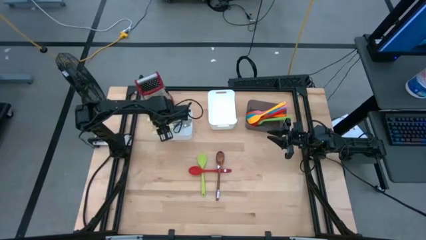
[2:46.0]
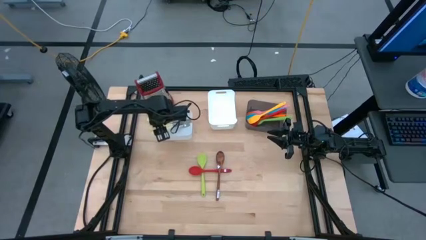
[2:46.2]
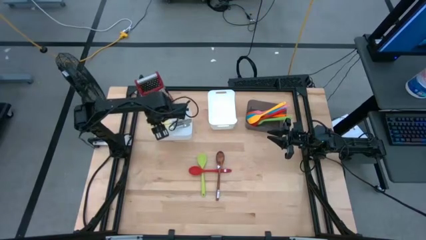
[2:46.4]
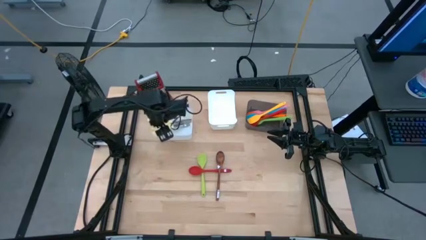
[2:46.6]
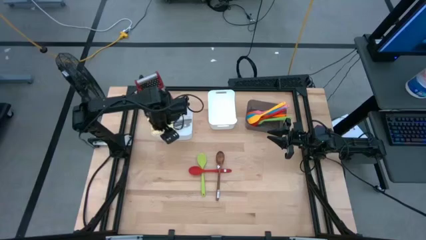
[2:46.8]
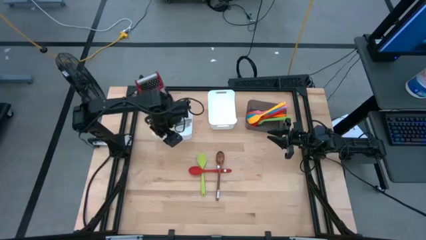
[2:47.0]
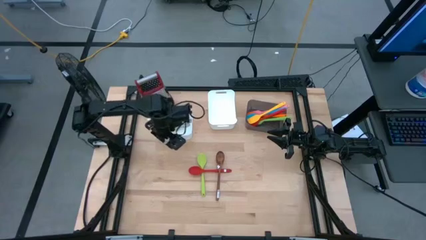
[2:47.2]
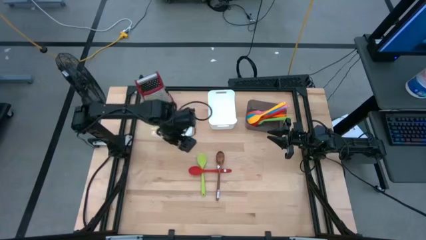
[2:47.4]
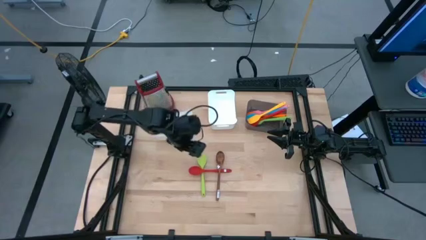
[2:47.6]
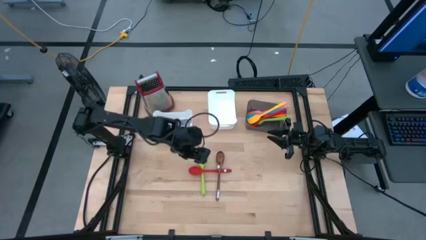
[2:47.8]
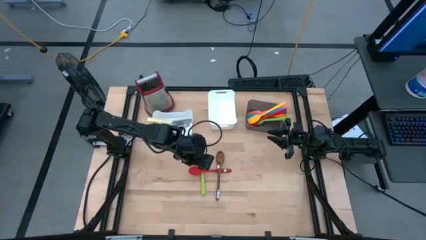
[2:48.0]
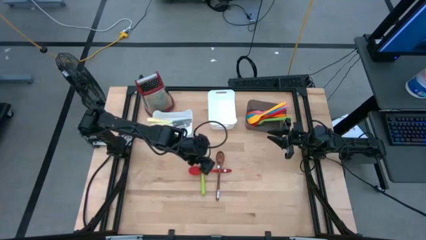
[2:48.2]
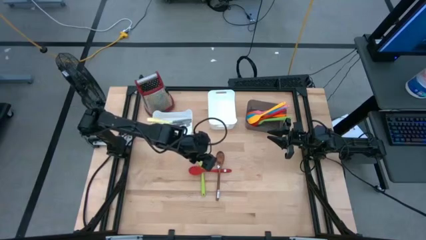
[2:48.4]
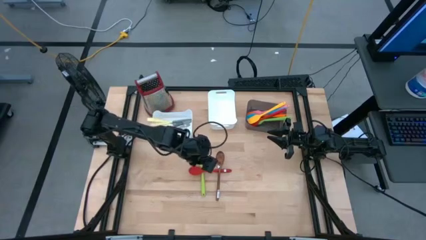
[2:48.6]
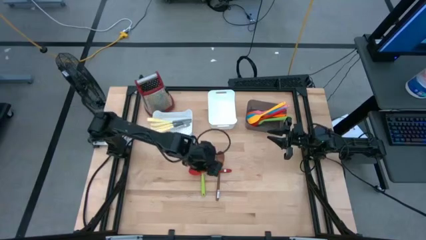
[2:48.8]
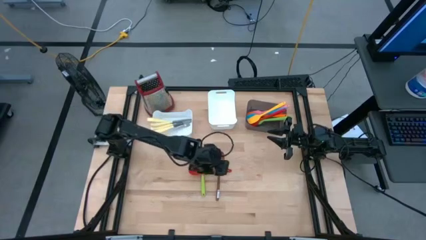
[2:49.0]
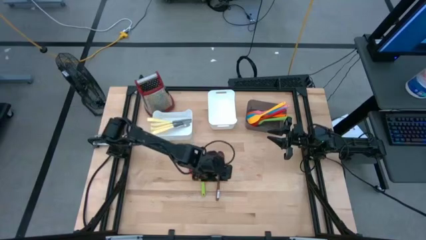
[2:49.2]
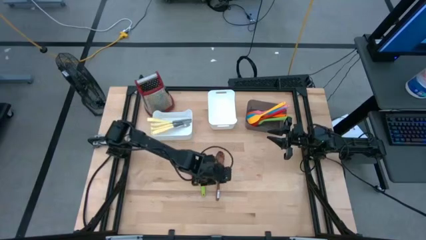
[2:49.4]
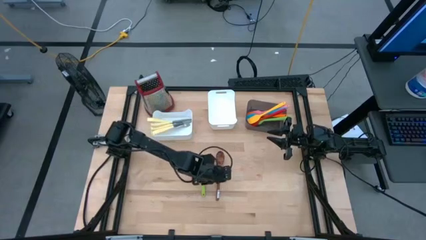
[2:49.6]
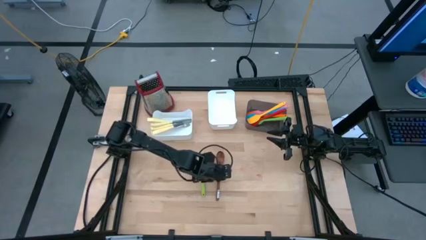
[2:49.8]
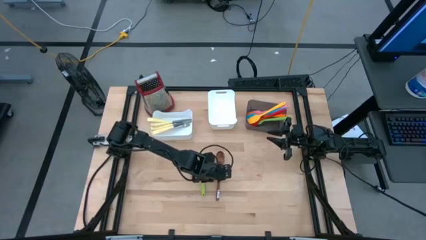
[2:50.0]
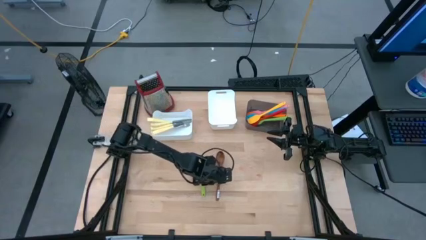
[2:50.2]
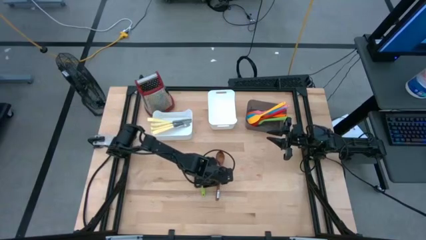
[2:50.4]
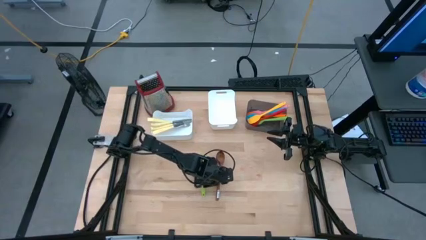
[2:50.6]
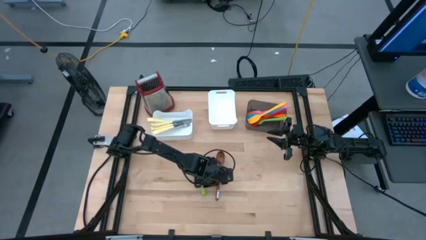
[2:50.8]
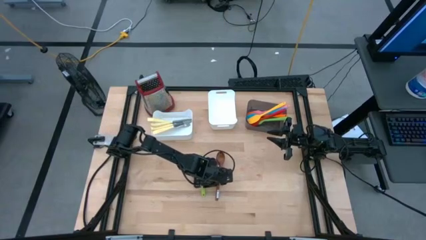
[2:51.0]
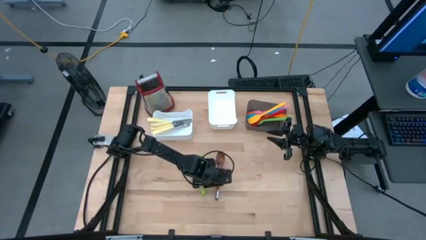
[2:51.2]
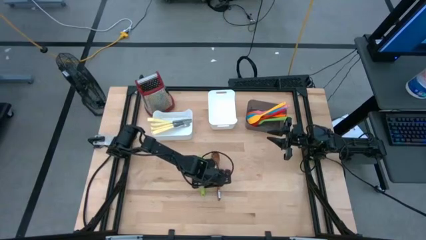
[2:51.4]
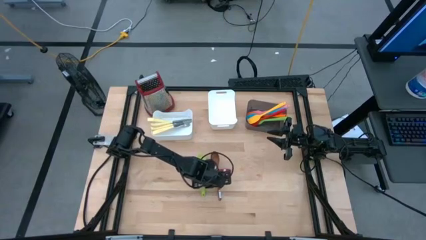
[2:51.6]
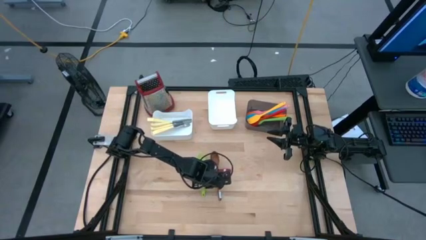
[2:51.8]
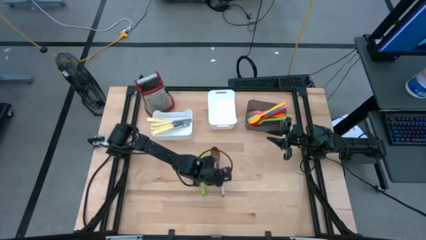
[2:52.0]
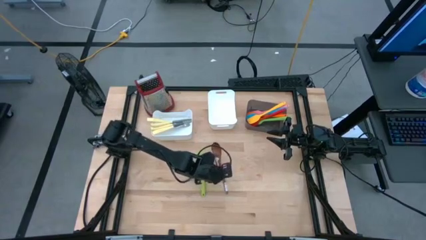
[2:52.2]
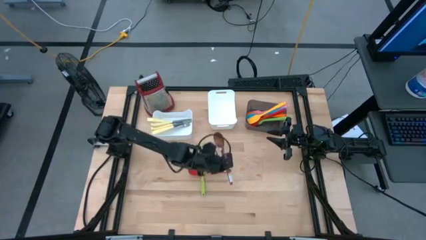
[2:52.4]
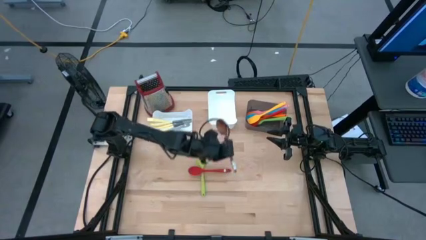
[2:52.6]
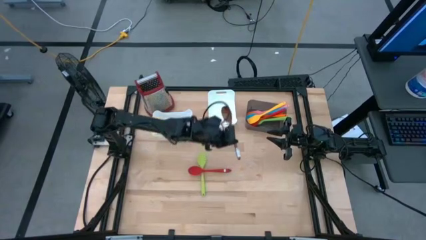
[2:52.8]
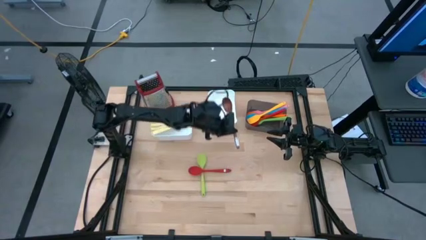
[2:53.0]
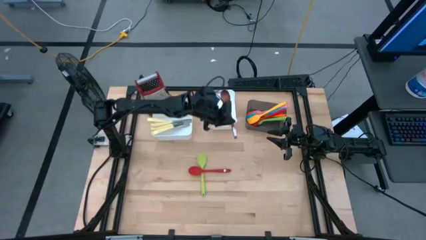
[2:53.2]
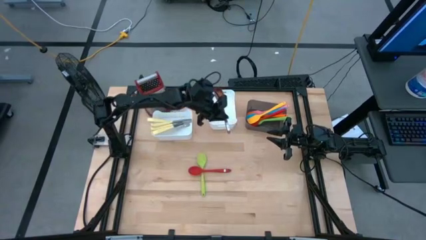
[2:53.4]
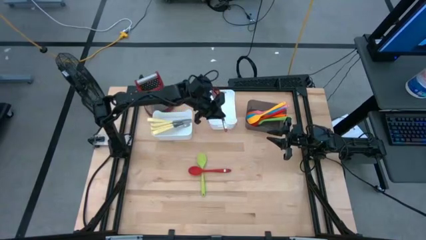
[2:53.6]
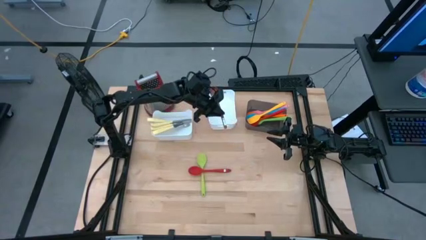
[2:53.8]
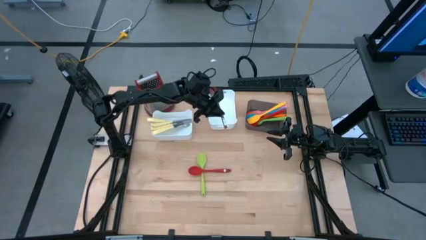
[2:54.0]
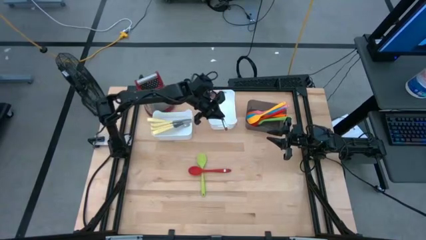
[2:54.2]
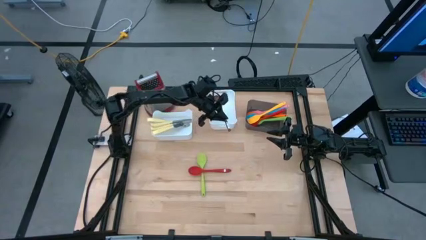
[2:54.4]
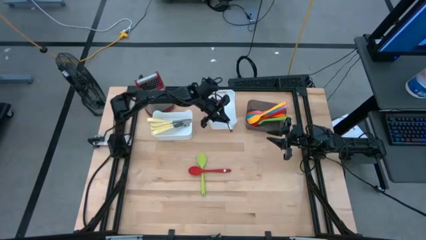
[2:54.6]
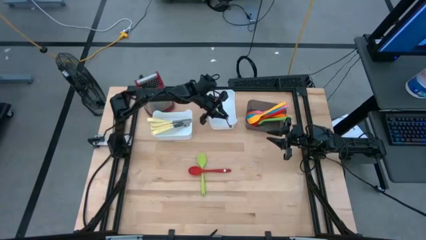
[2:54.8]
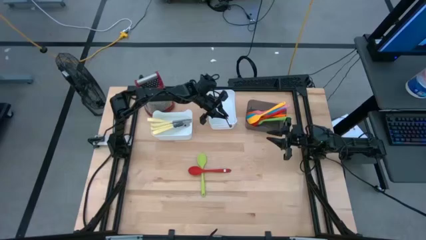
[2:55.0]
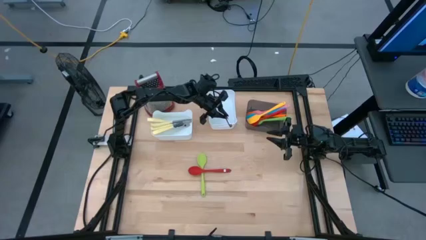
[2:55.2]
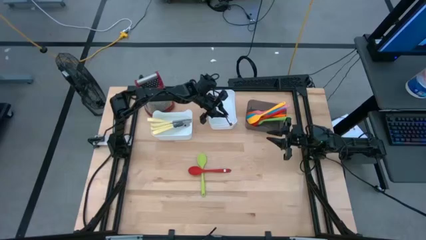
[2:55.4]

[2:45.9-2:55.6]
Task: Pick & Place Kitchen Items
Put the brown serving spoon into the right white bin
